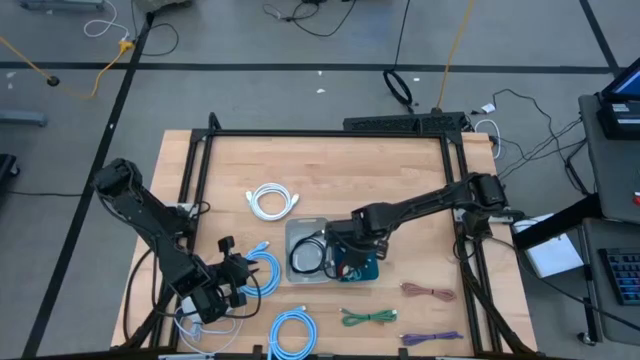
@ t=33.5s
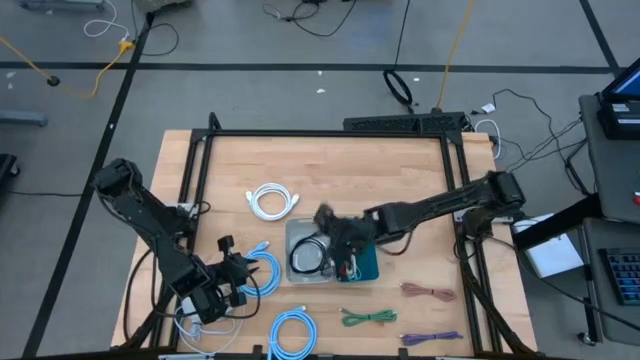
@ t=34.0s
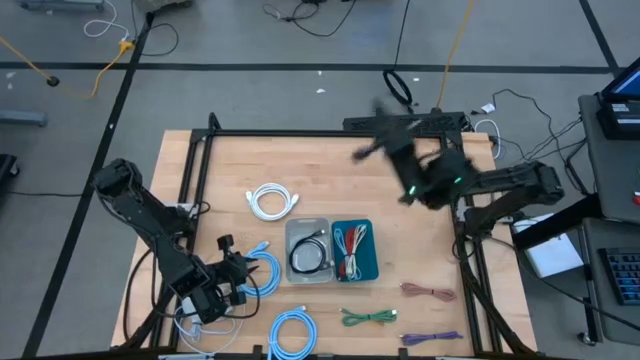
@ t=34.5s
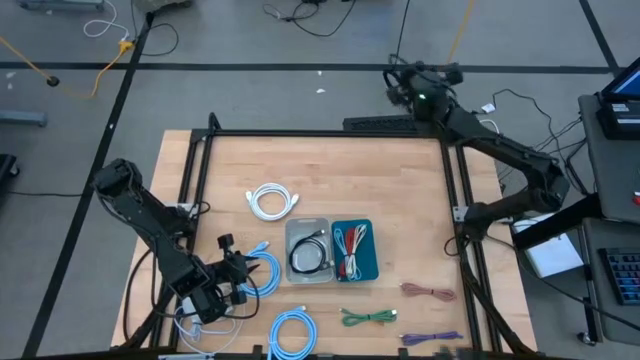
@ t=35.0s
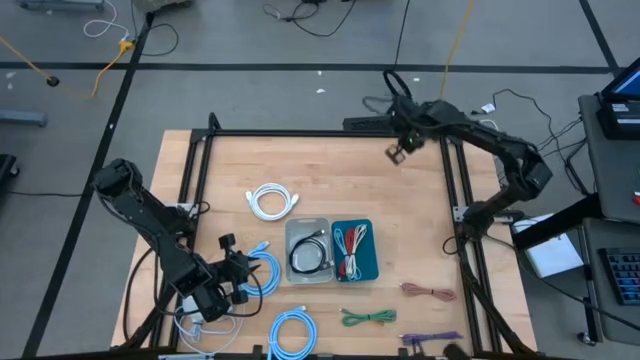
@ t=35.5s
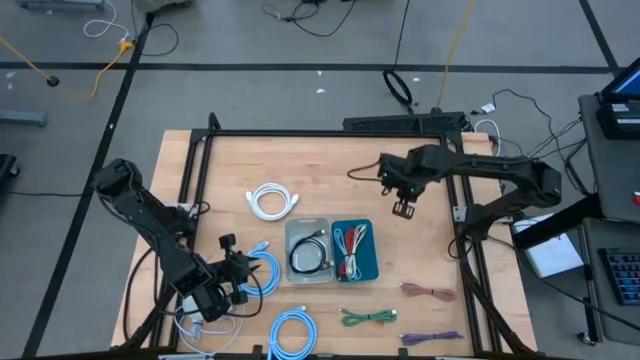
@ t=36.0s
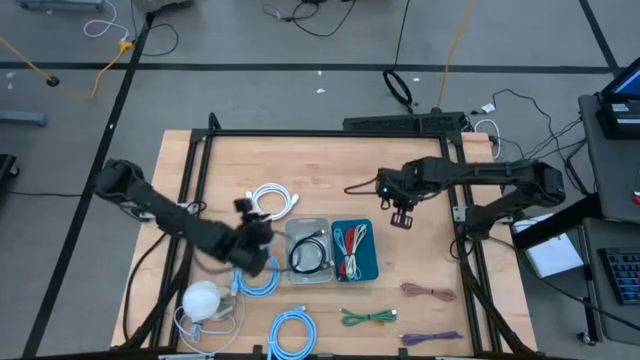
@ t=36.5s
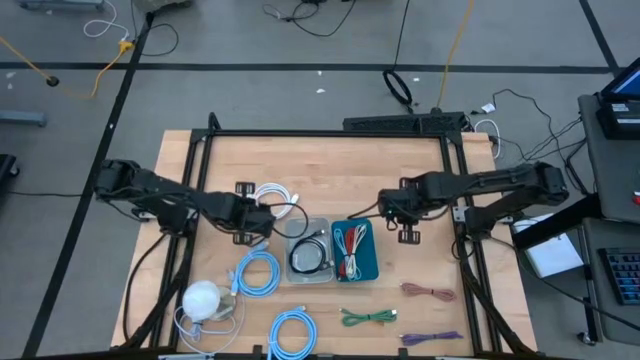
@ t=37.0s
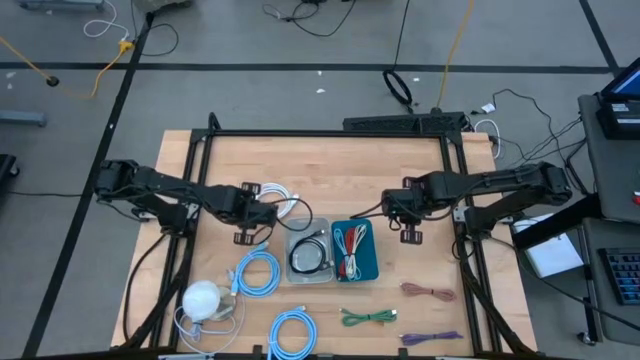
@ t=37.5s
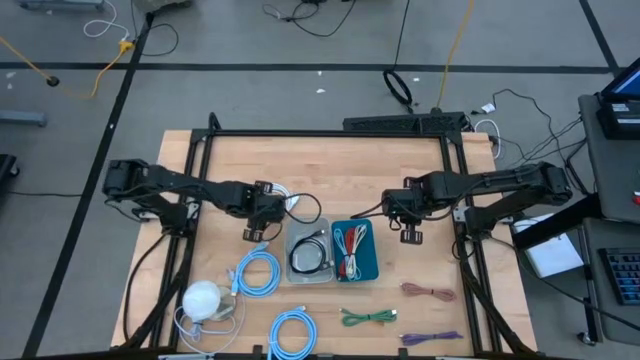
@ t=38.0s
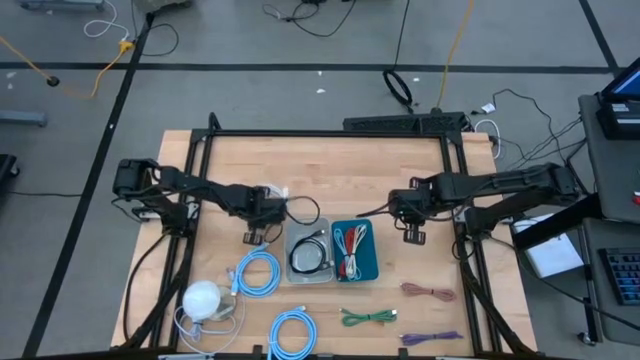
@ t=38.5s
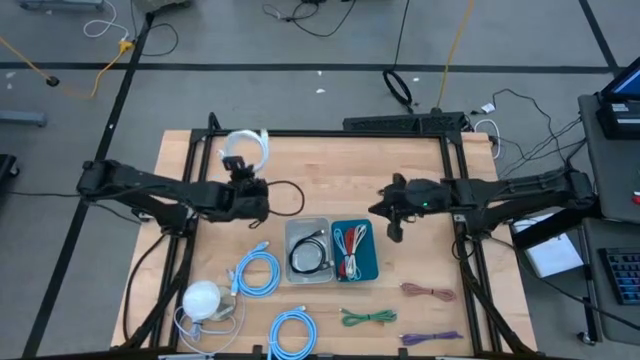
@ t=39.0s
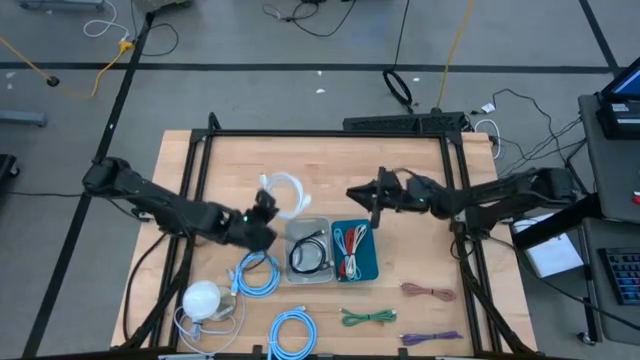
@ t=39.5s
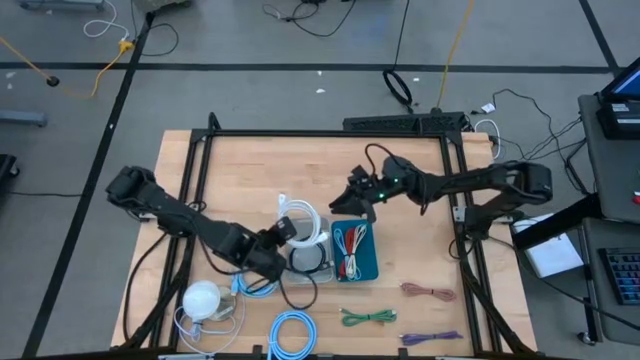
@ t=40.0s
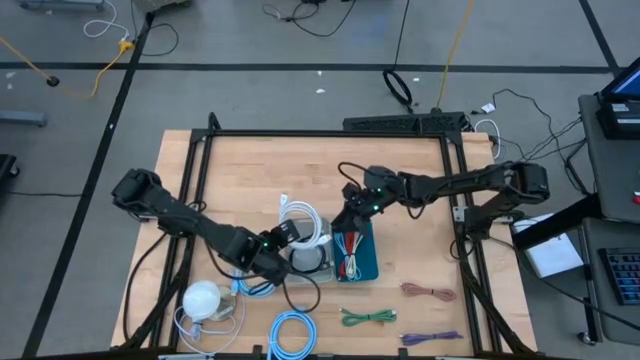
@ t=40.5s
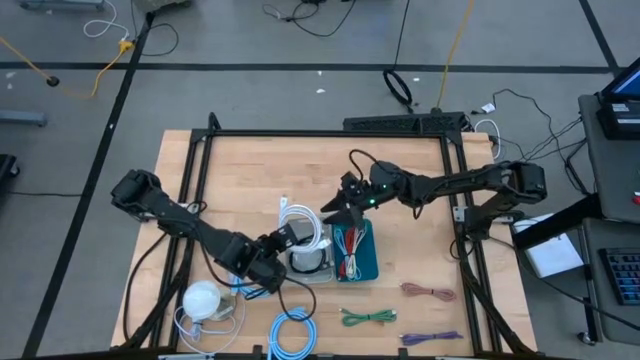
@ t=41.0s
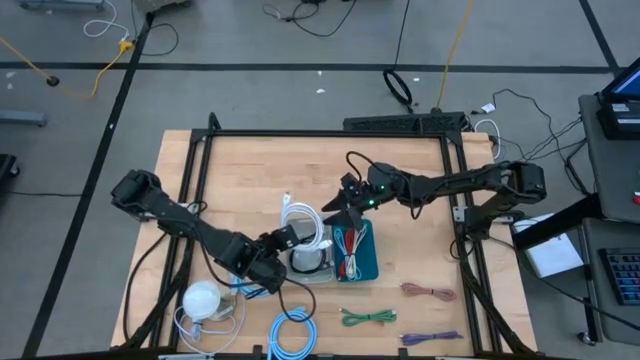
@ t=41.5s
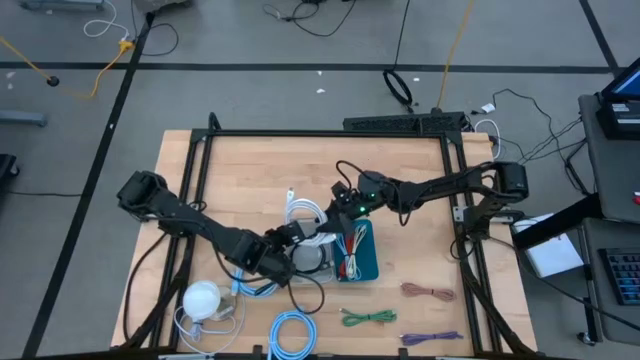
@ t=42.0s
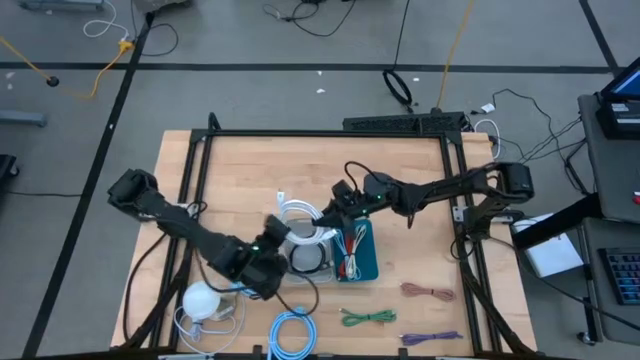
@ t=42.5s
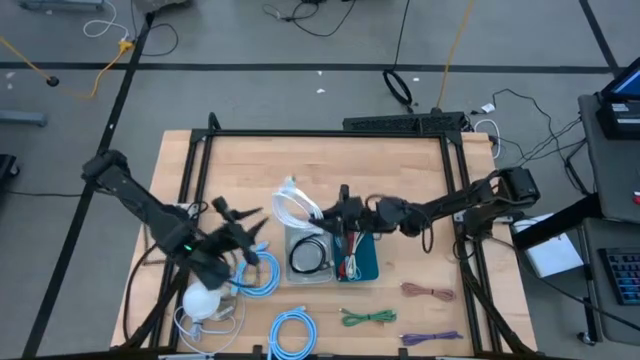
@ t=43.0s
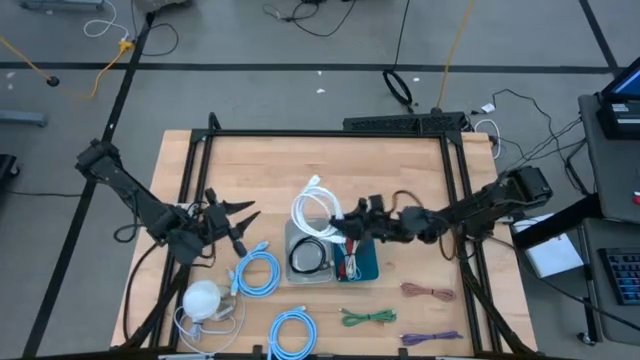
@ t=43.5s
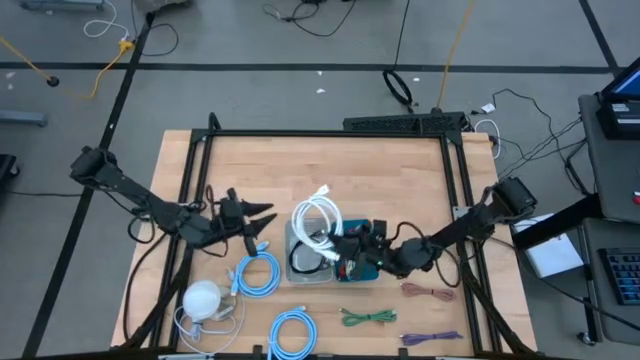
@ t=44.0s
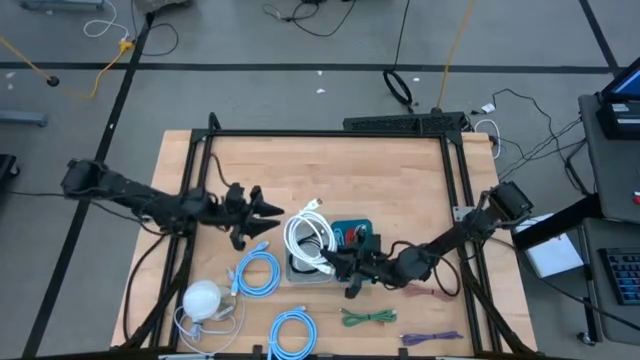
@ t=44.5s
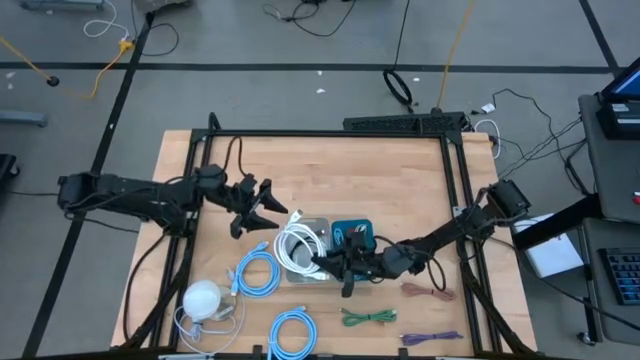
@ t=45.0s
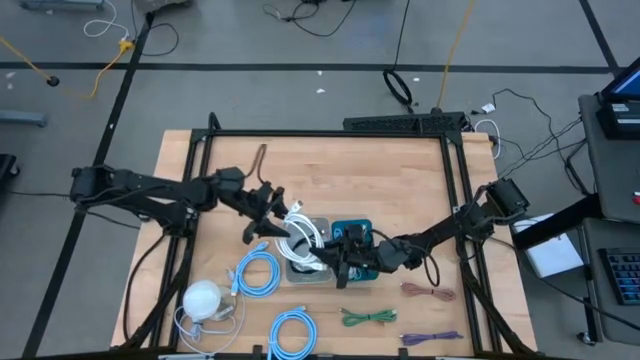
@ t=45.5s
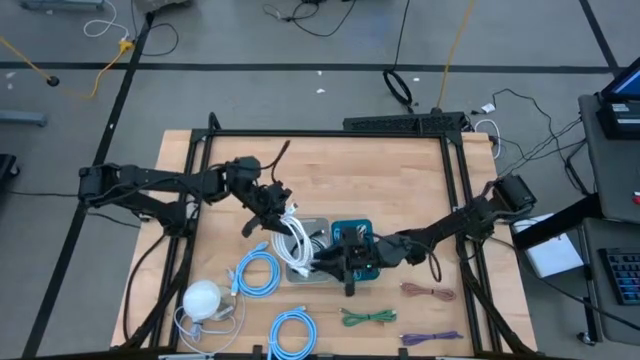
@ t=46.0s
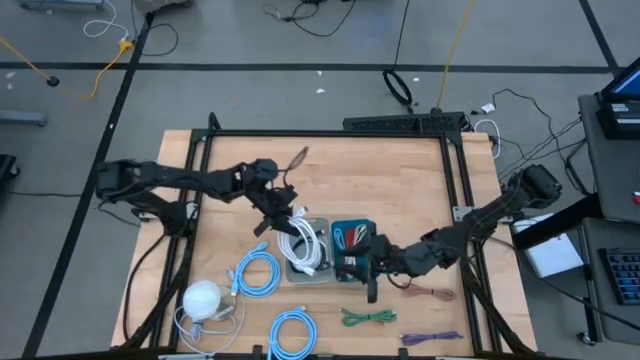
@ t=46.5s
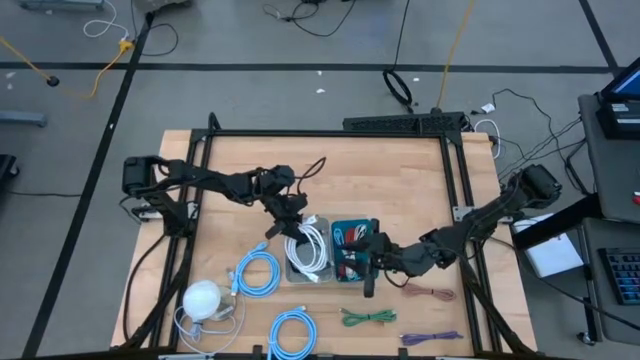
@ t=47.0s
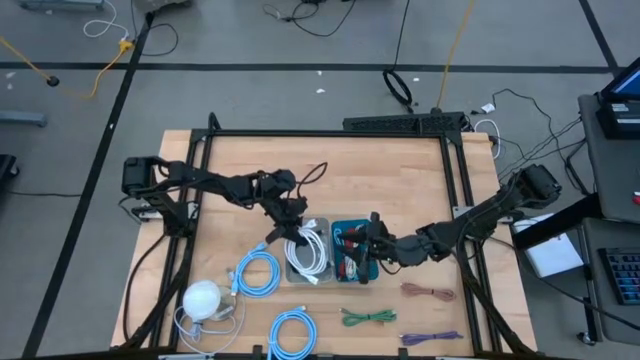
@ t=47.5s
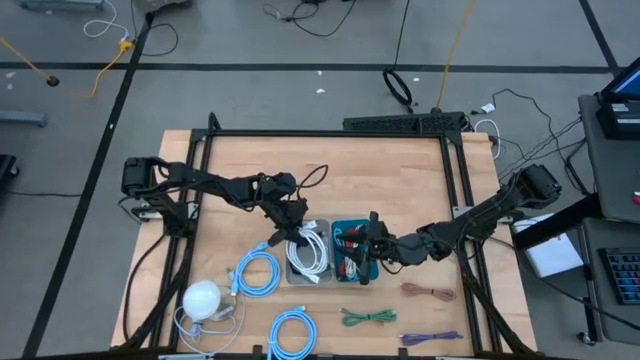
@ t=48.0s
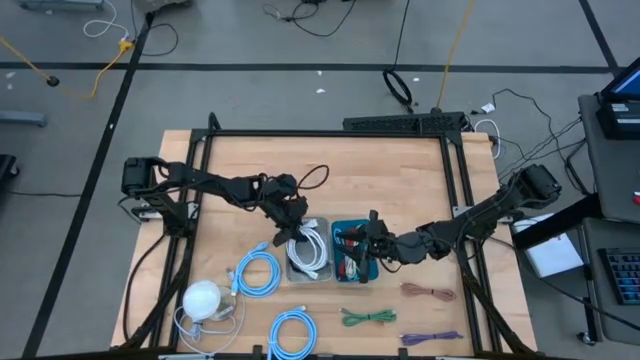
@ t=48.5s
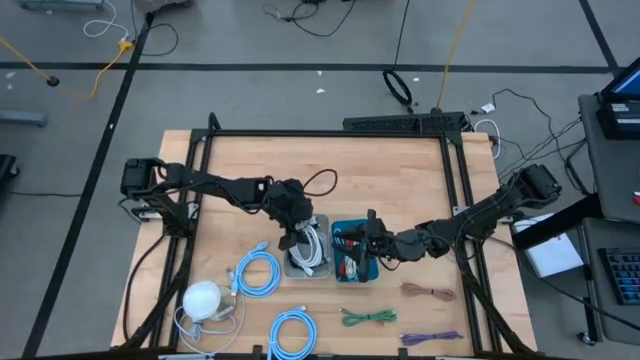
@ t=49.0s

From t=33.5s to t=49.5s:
Task: Pick & Place USB Port
Put the white display cable into the gray bin

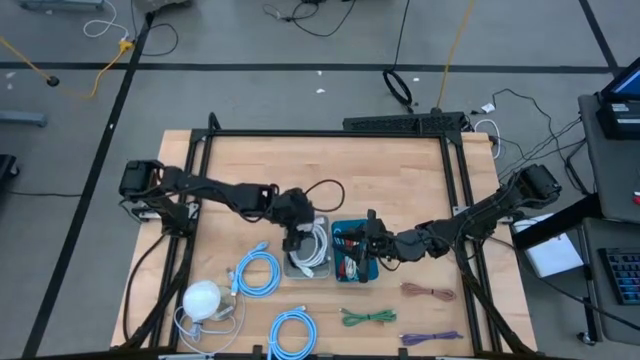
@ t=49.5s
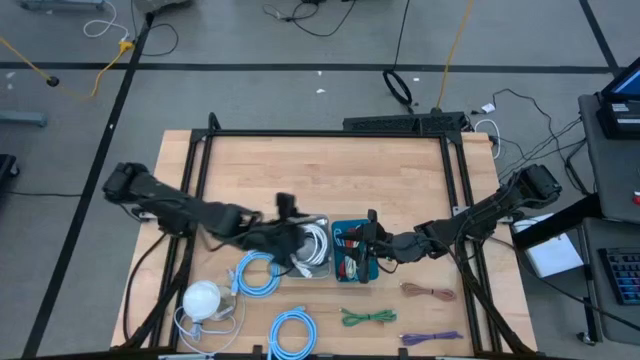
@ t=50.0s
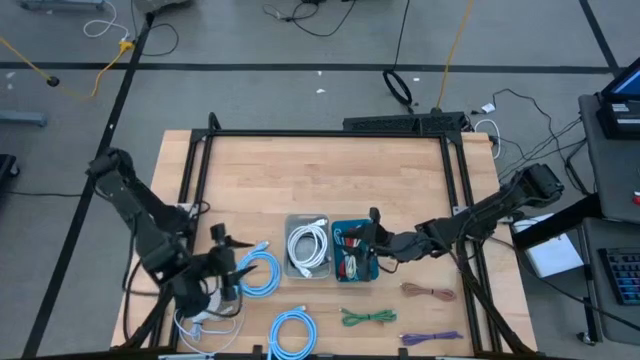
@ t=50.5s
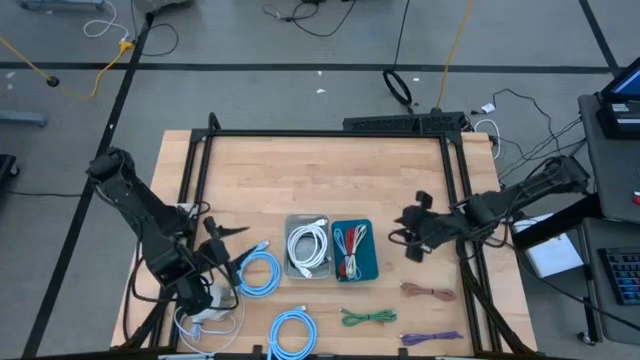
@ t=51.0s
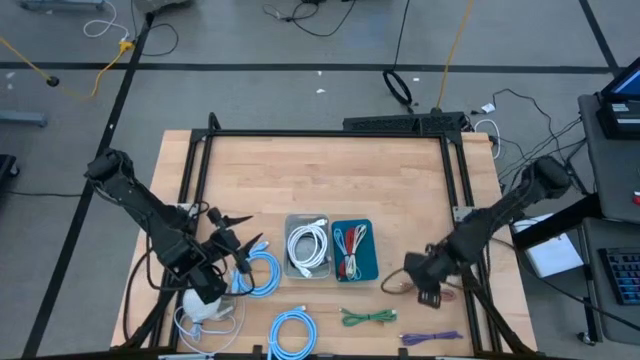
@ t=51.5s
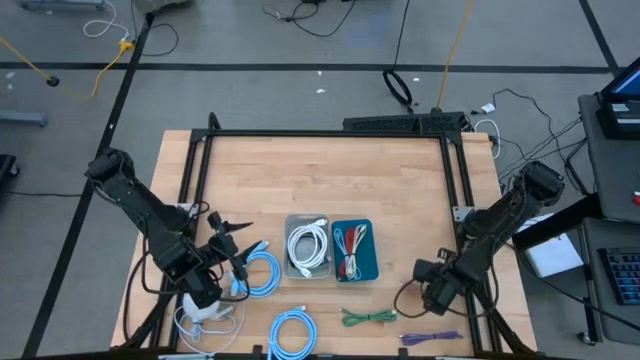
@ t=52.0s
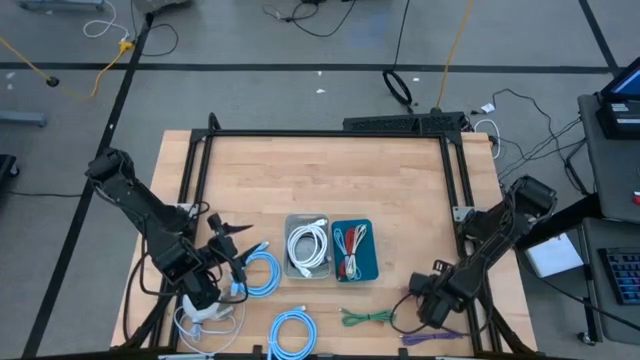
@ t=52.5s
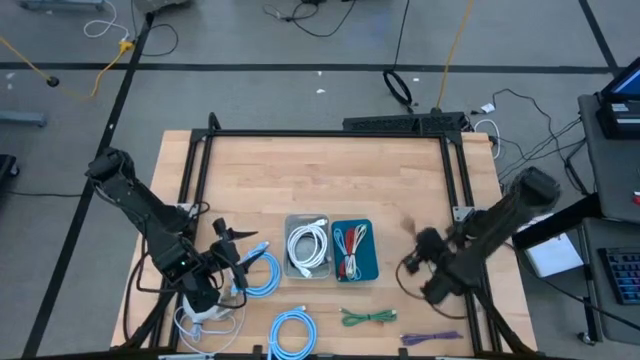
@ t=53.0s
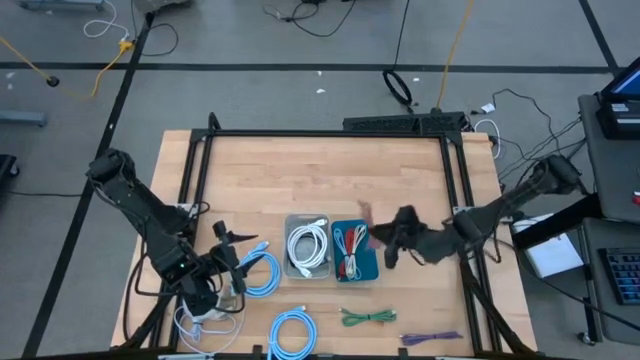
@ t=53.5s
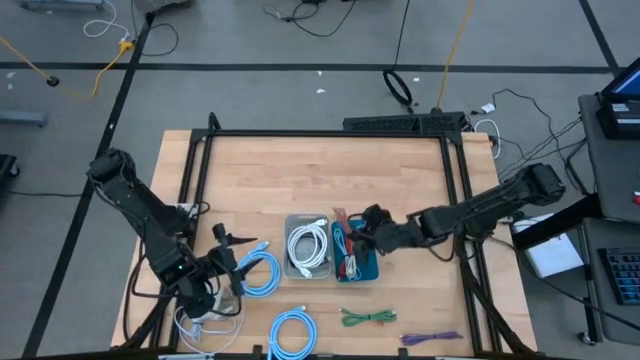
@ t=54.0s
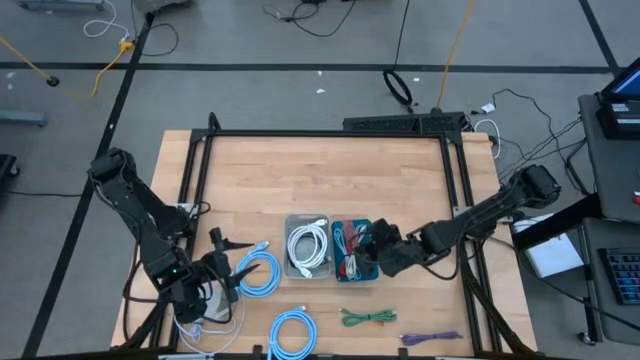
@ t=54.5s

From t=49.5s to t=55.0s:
Put the brown charger cable into the blue bin
